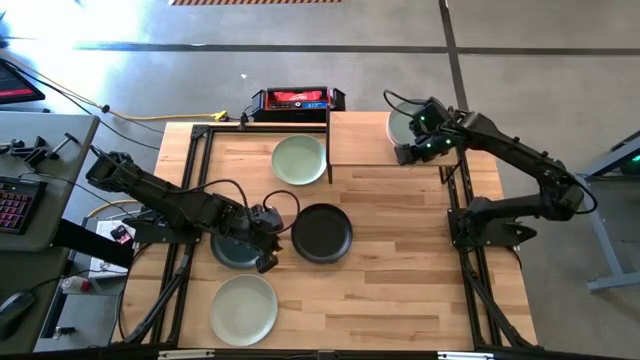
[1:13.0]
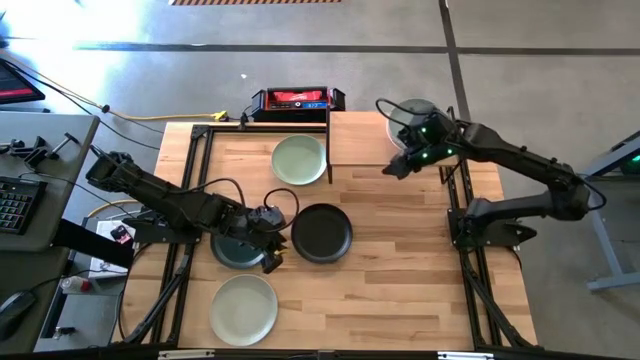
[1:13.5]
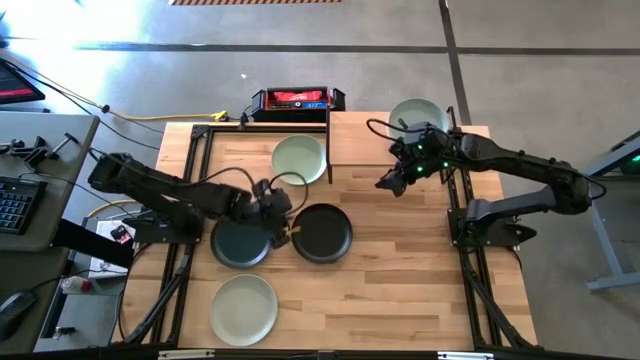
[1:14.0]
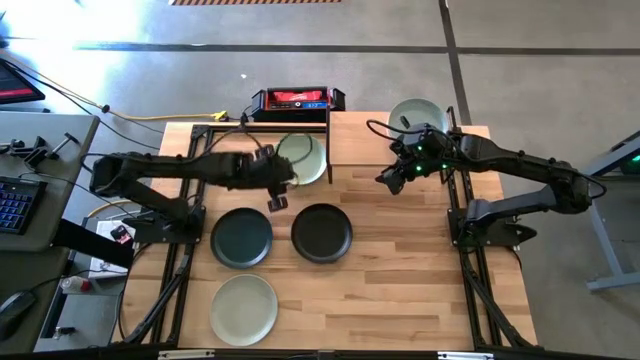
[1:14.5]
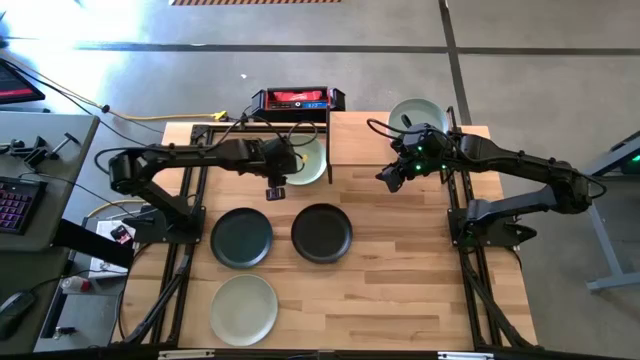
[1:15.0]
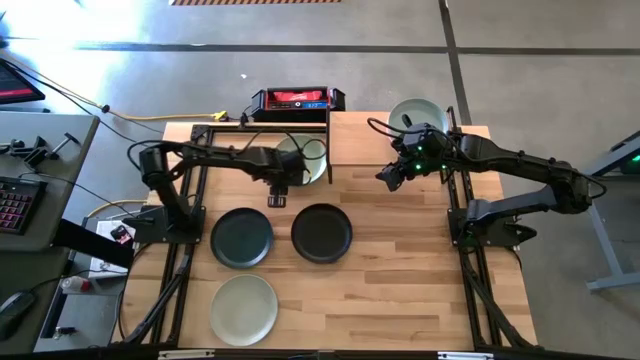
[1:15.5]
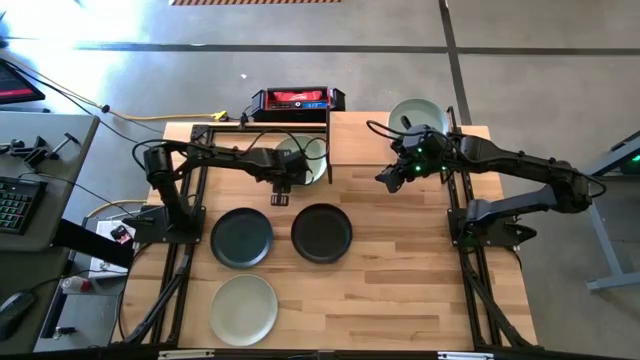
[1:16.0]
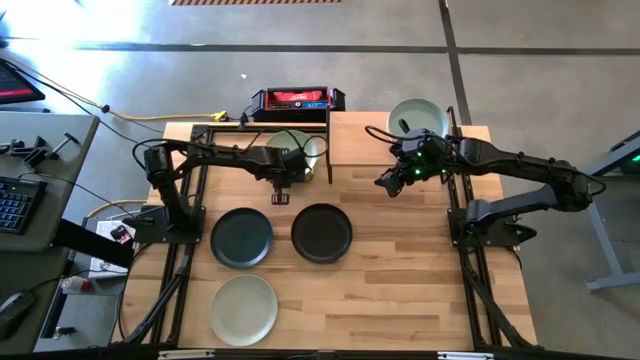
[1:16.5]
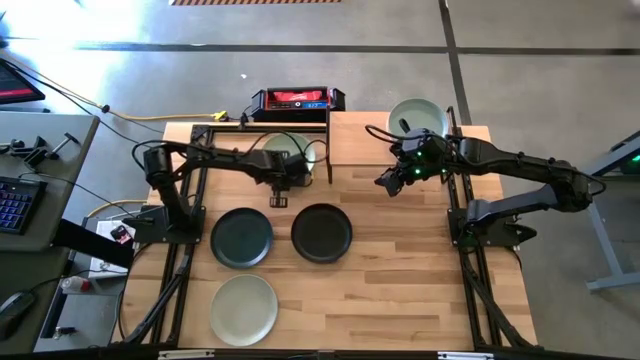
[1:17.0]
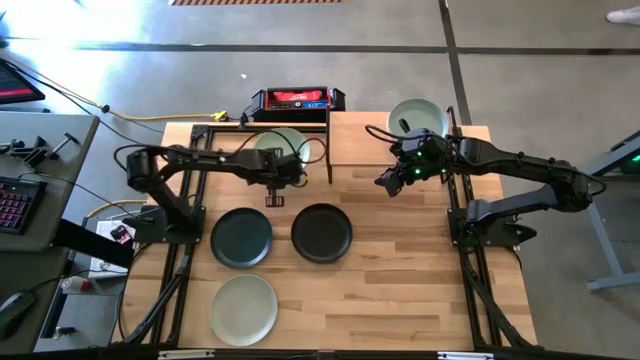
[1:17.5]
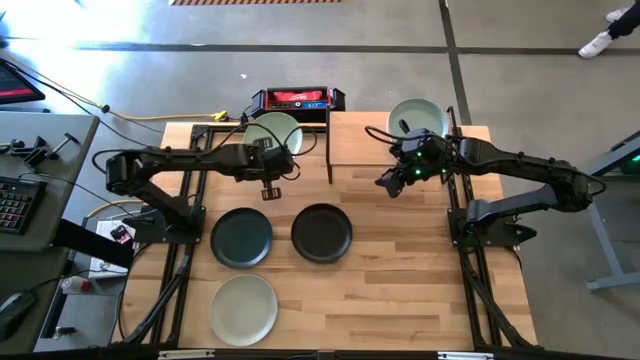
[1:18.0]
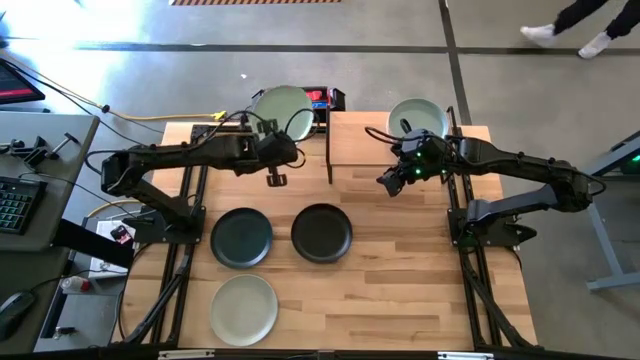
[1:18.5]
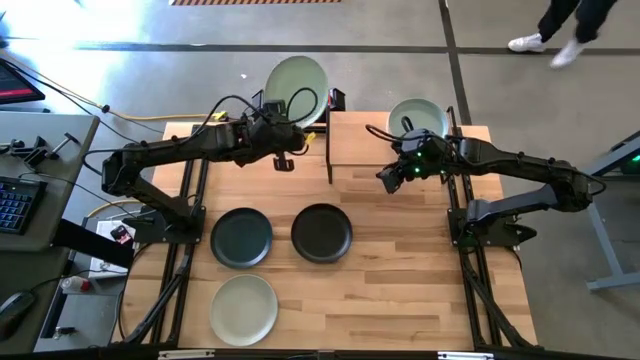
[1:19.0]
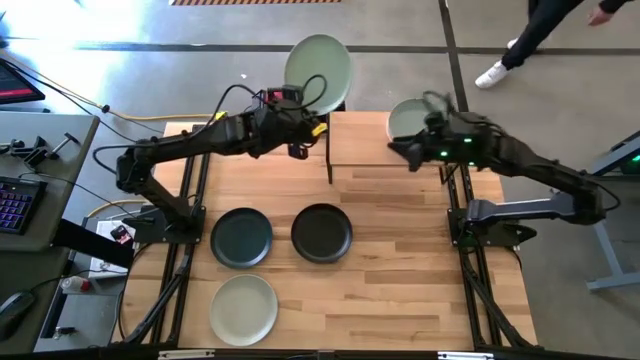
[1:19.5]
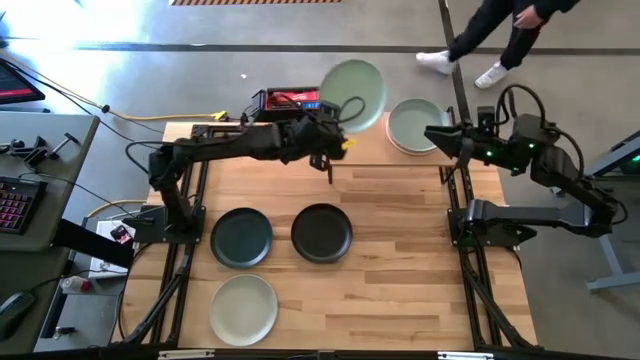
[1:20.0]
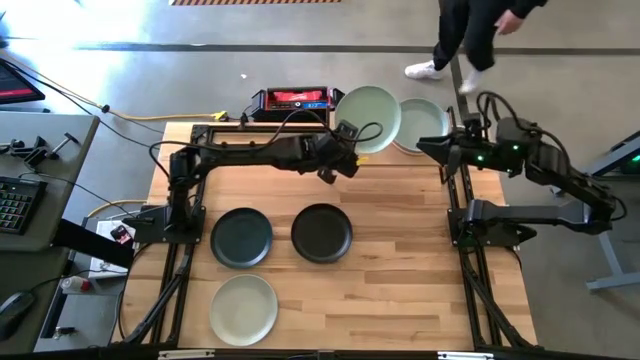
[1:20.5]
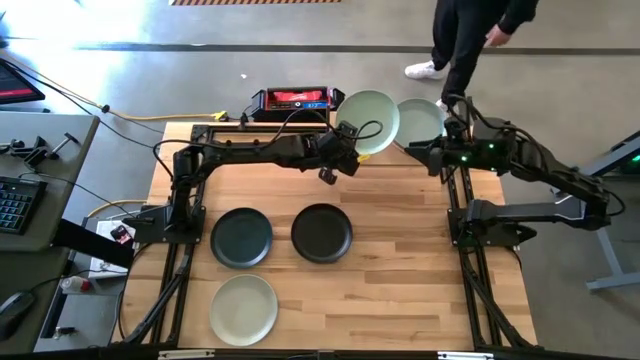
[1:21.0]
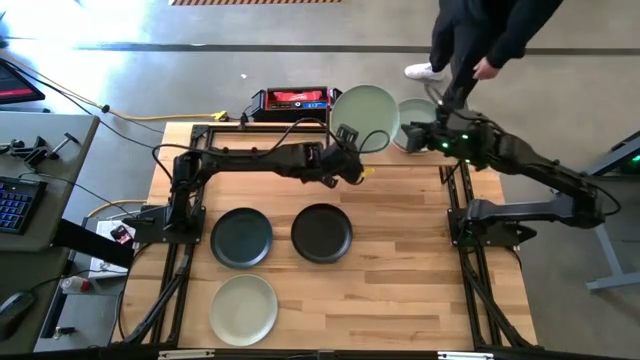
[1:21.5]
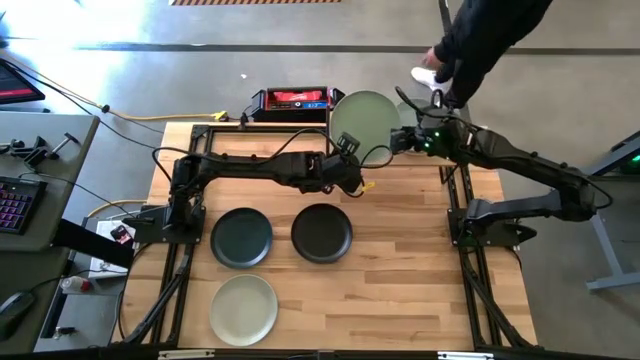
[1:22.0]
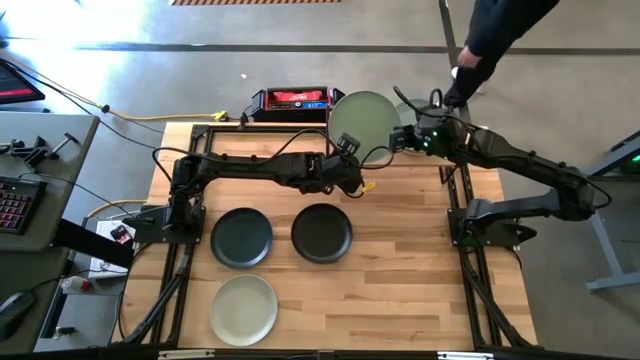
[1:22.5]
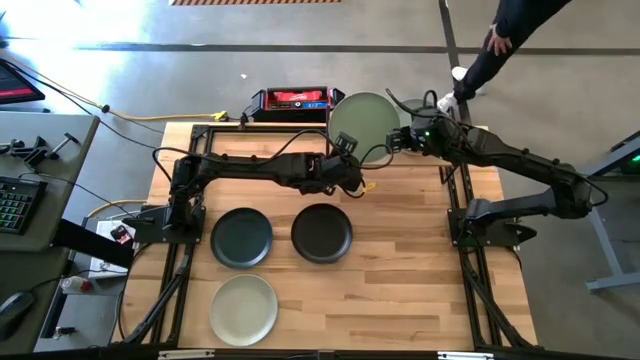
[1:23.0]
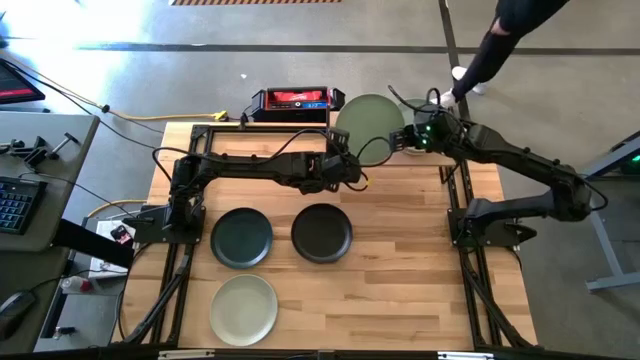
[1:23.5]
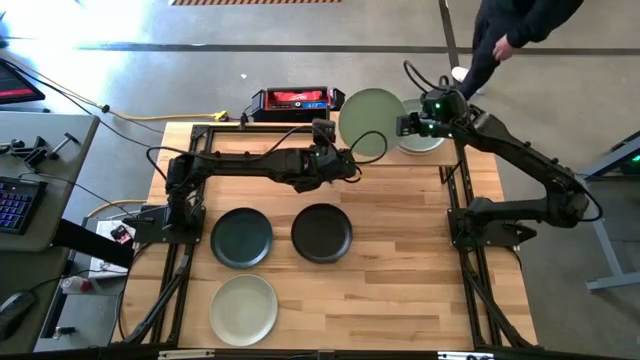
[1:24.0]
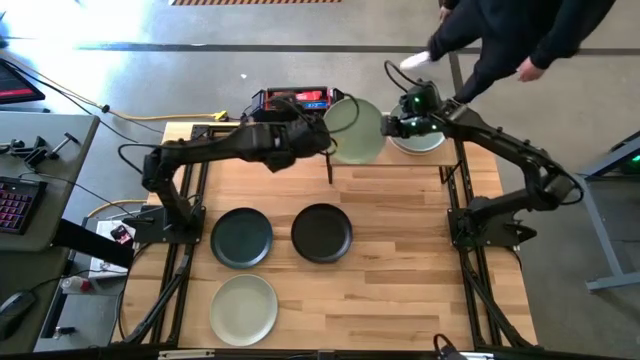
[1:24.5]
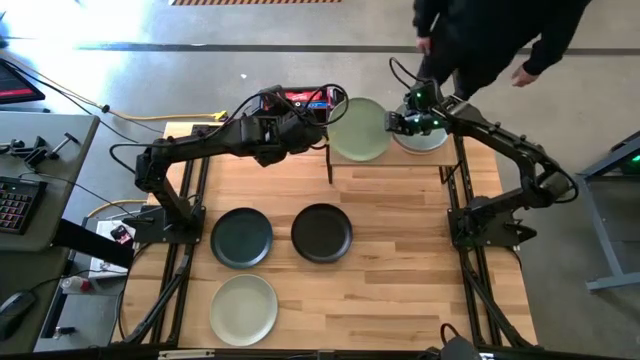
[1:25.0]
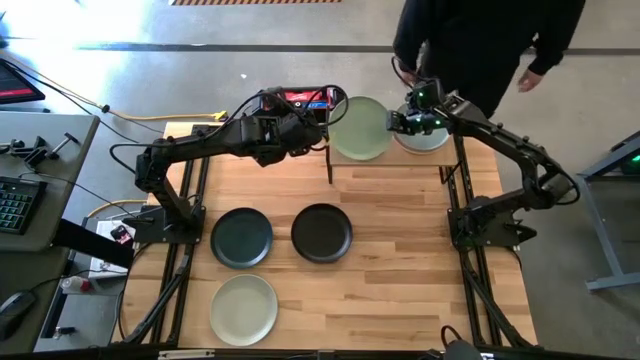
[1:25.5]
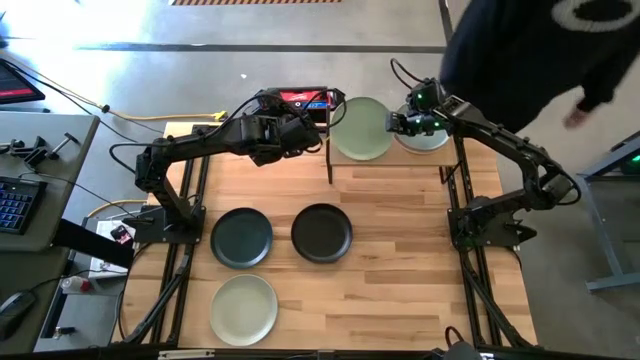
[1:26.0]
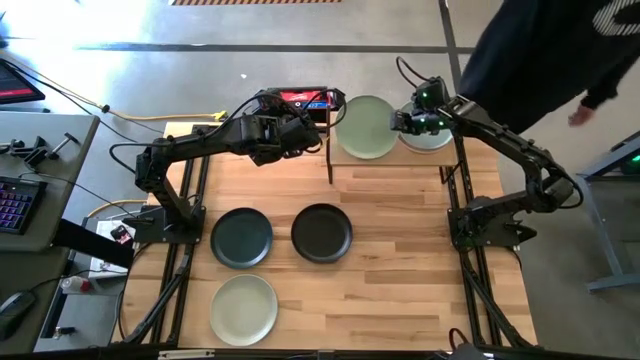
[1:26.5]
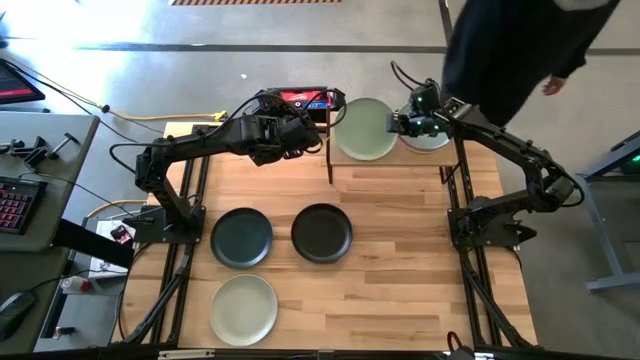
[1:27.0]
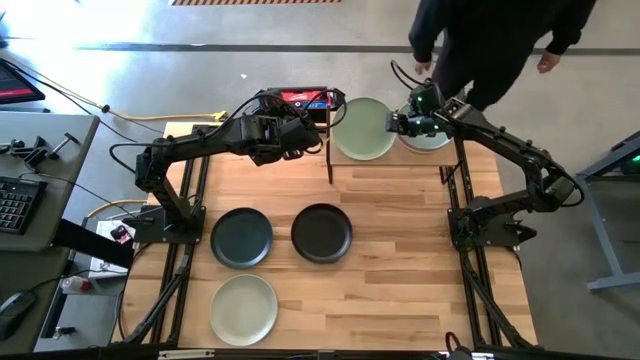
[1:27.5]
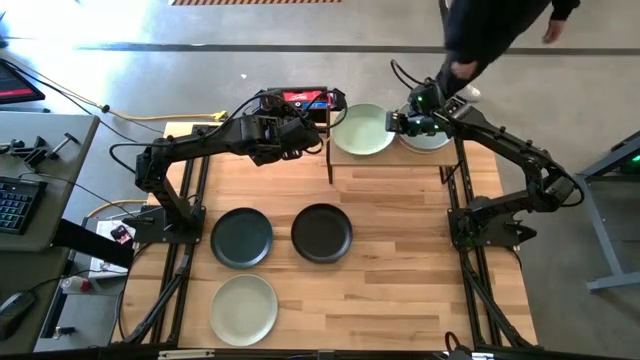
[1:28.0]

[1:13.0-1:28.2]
Task: Place and stack plates onto a shelf
Put the light green plate on the shelf

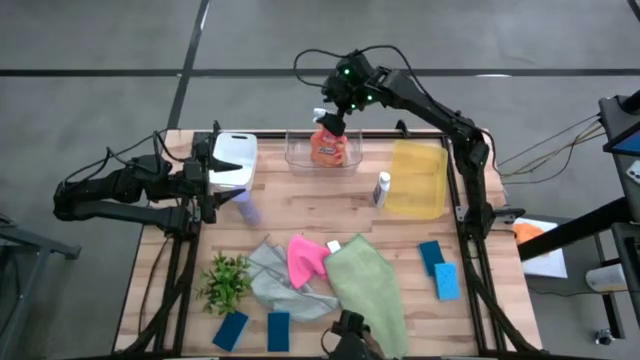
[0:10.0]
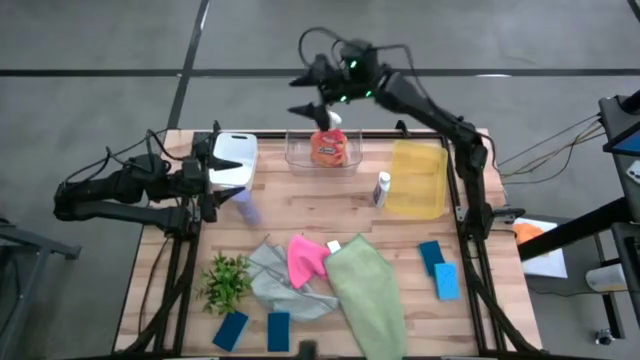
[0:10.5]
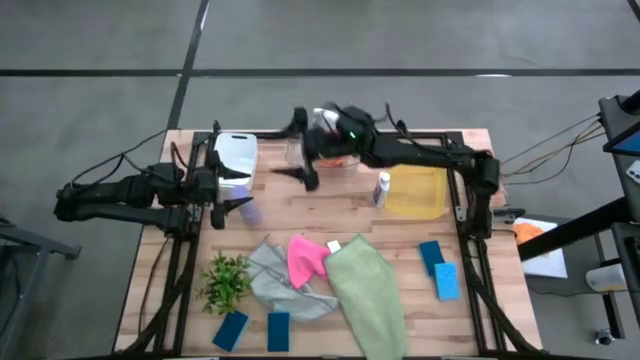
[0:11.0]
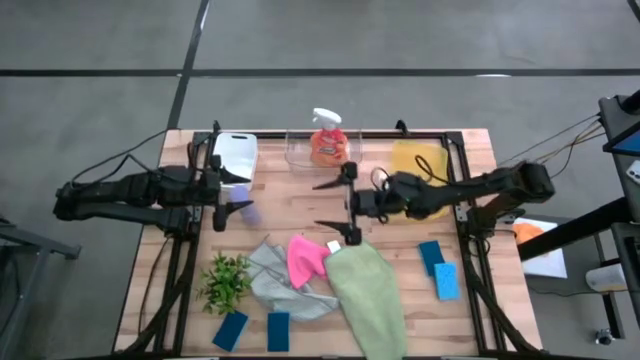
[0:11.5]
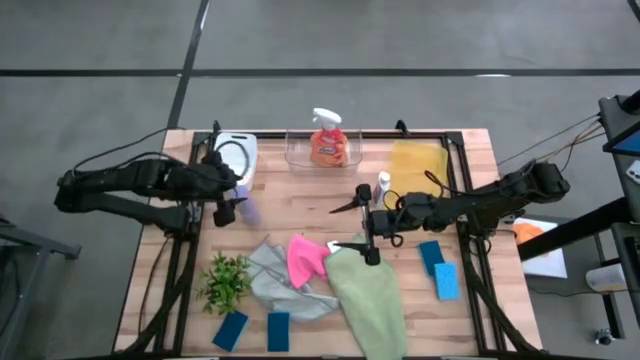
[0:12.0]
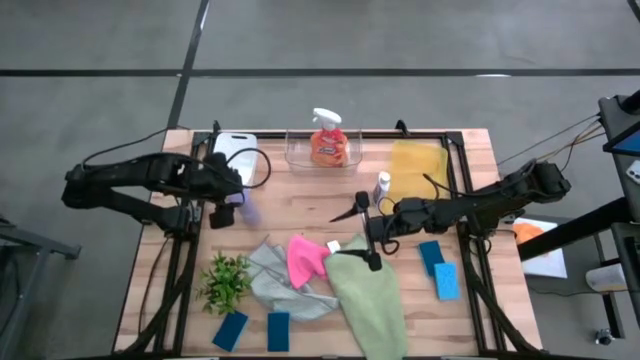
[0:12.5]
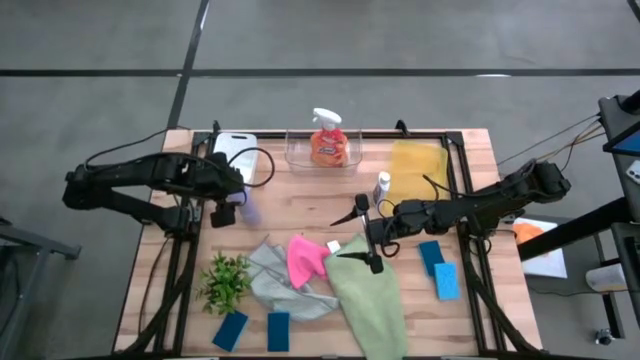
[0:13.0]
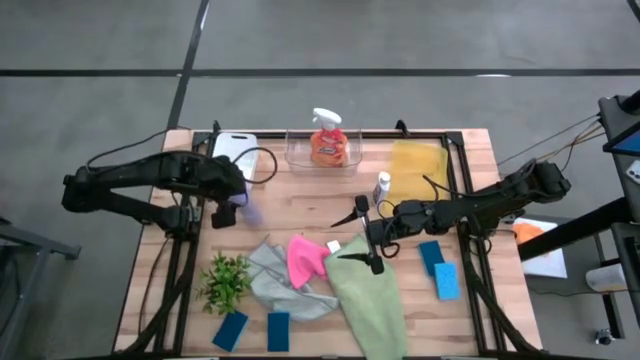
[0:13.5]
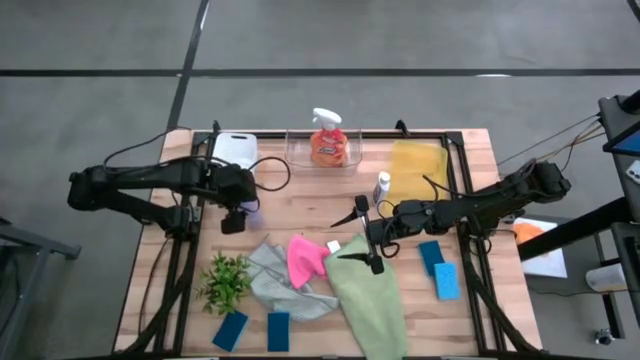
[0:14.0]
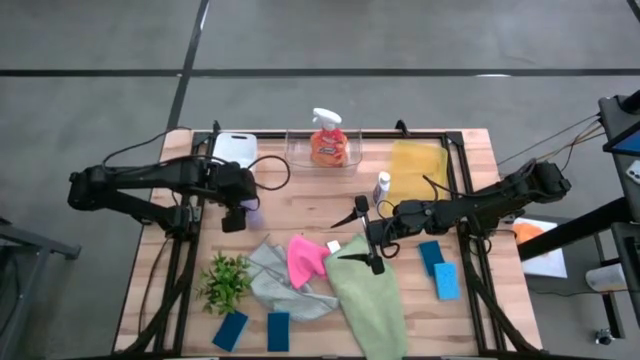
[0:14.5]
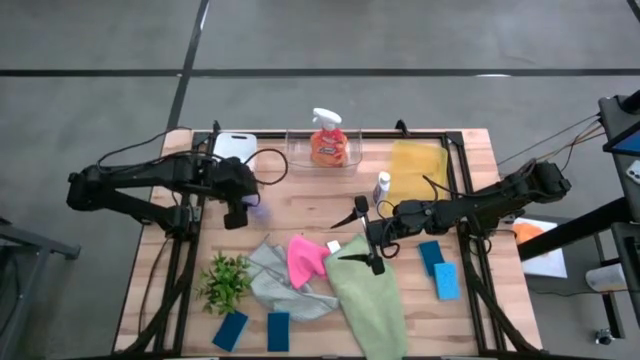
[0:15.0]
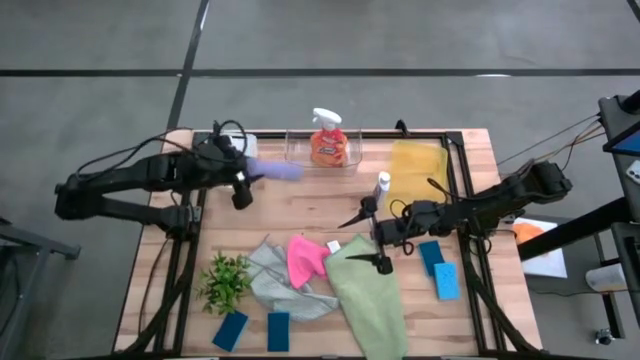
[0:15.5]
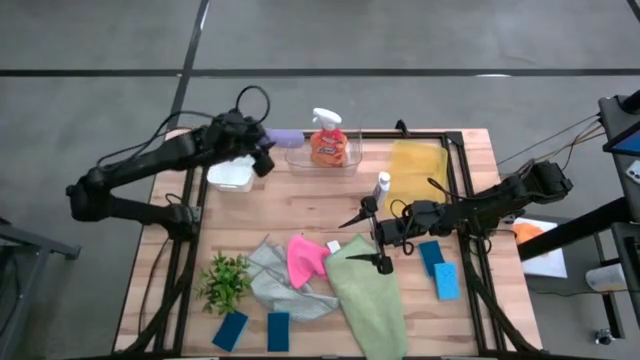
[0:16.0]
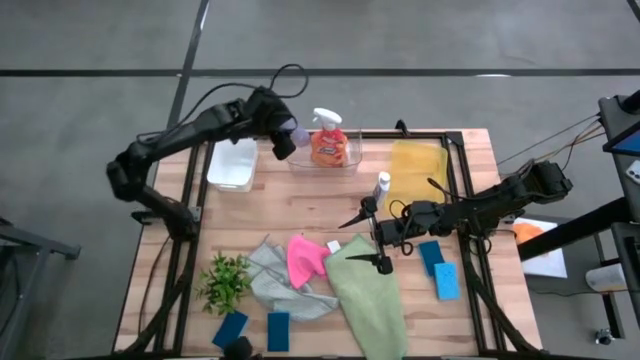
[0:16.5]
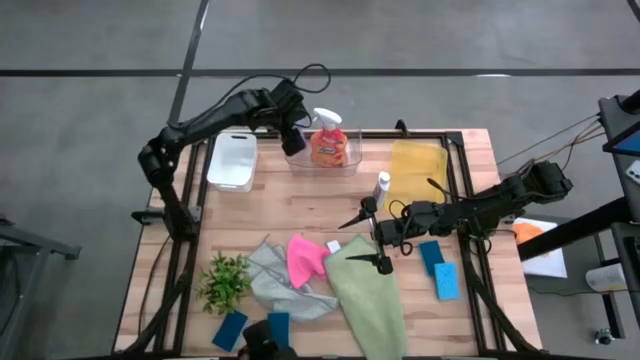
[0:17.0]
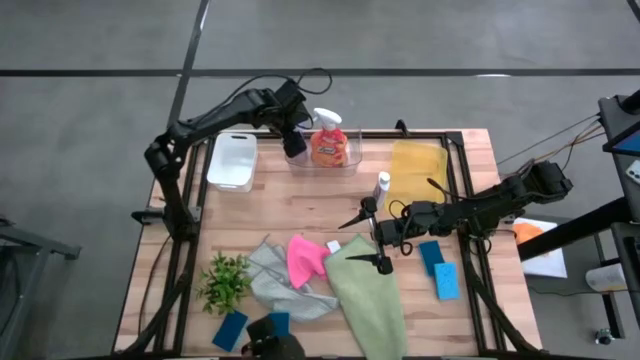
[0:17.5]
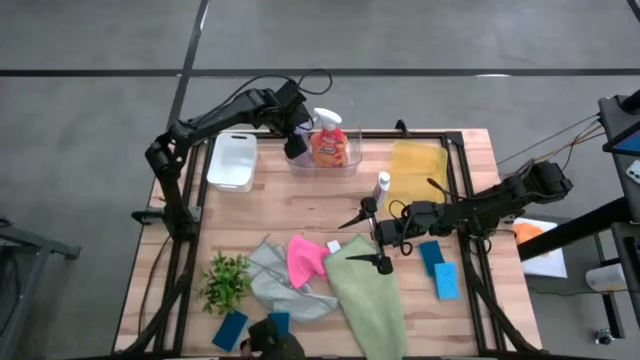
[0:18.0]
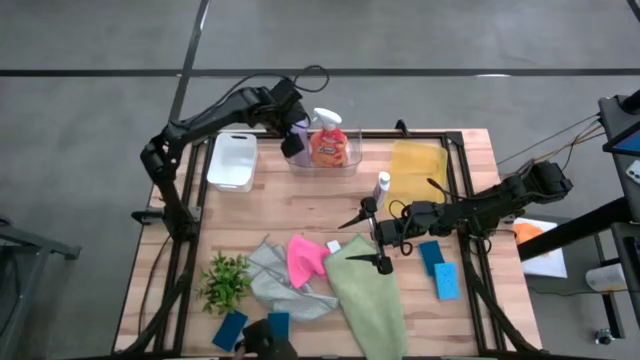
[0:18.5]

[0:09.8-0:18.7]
Task: Pick & Place Kitchen Items
Put the purple air freshener spray into the transparent bin
